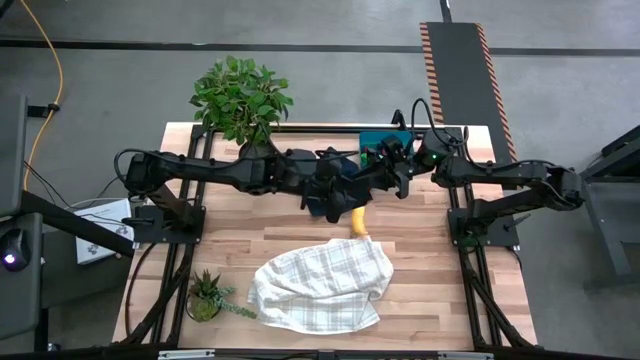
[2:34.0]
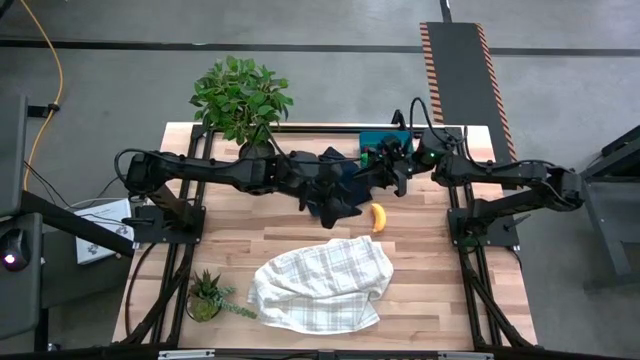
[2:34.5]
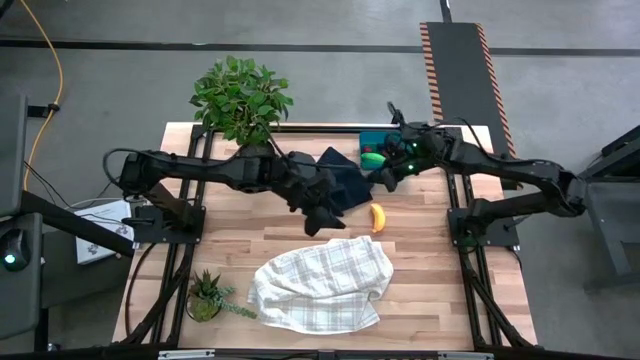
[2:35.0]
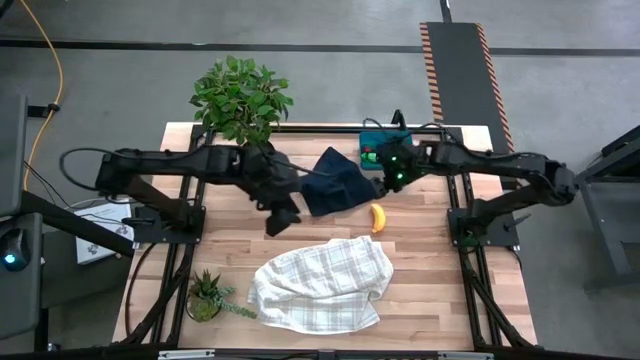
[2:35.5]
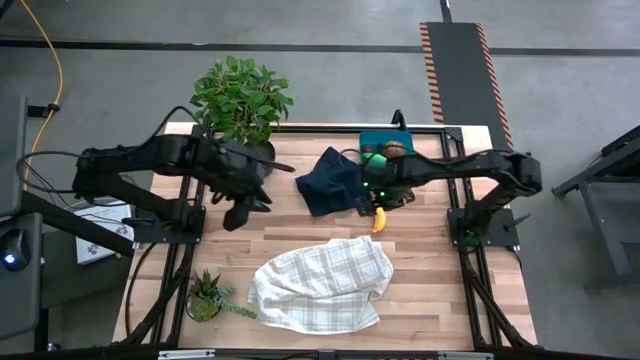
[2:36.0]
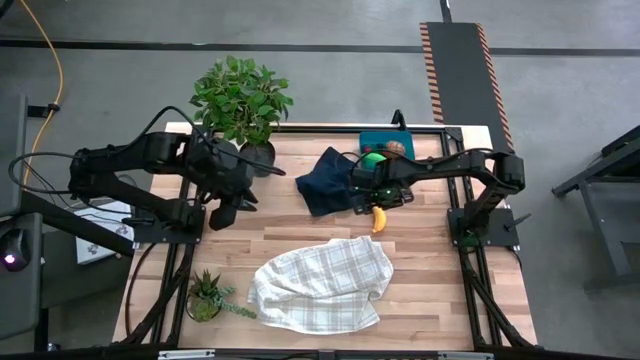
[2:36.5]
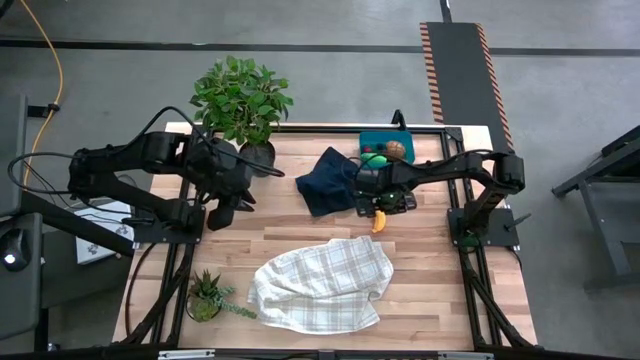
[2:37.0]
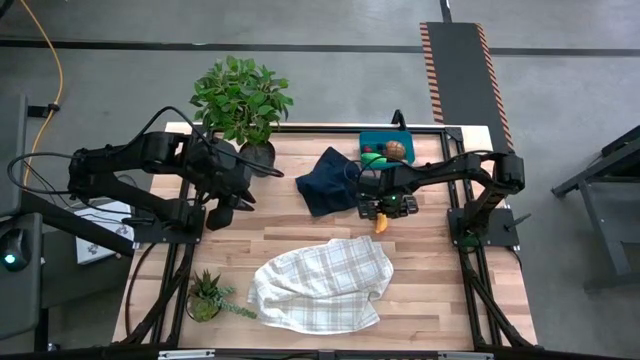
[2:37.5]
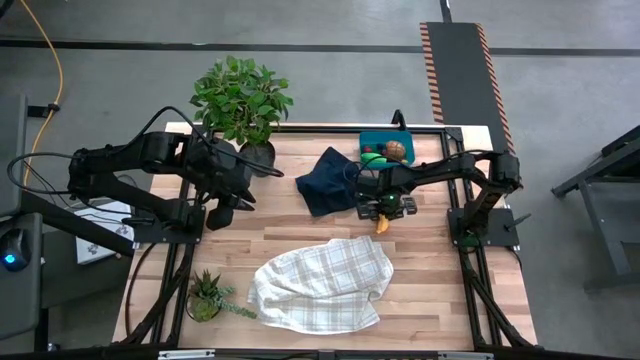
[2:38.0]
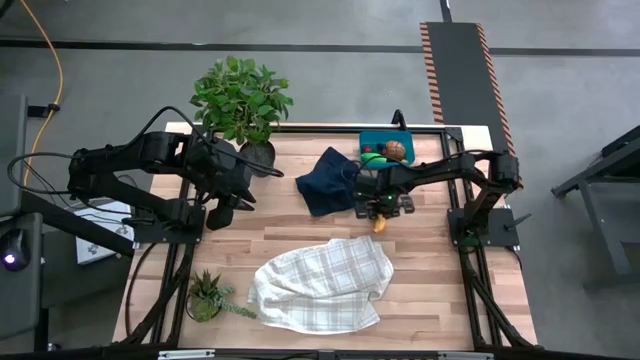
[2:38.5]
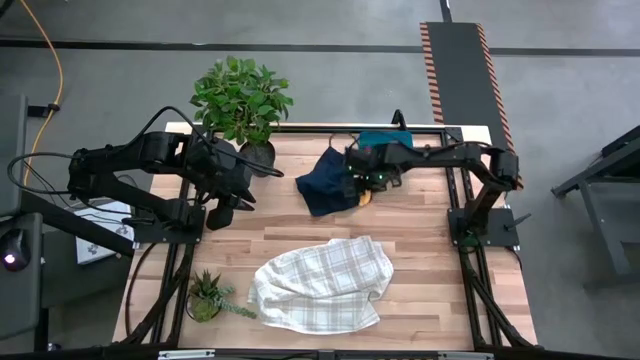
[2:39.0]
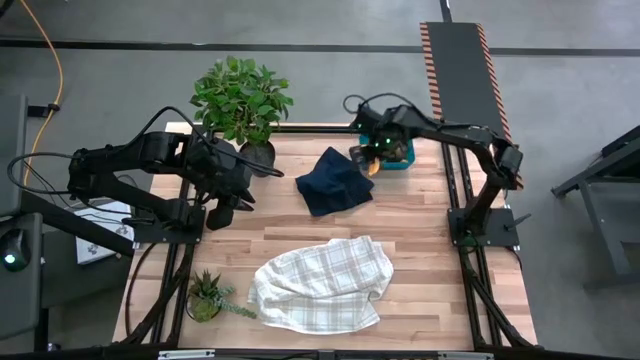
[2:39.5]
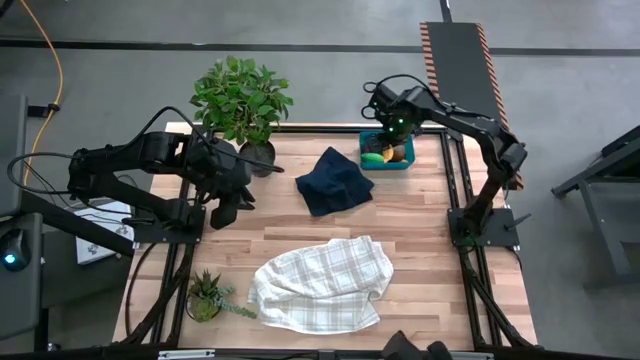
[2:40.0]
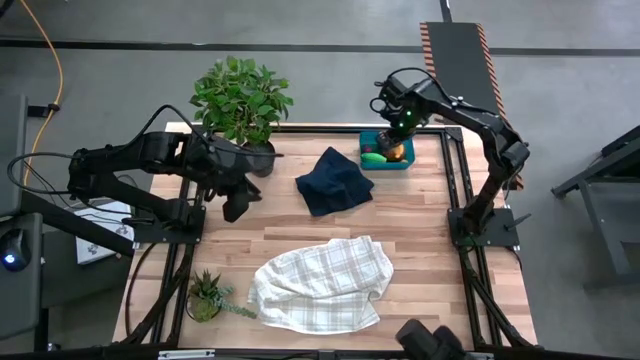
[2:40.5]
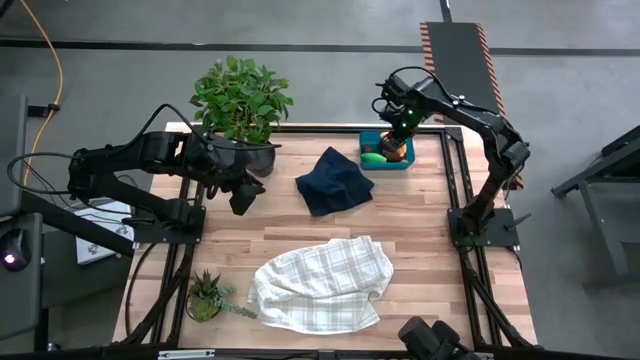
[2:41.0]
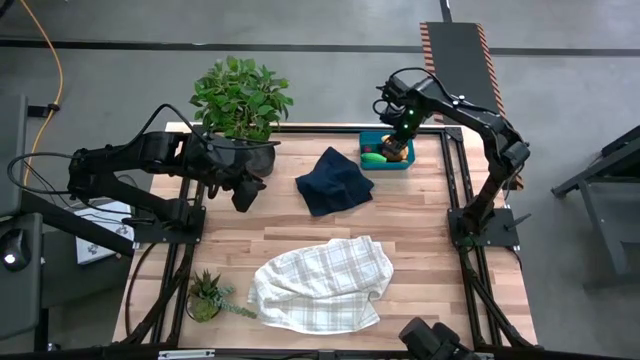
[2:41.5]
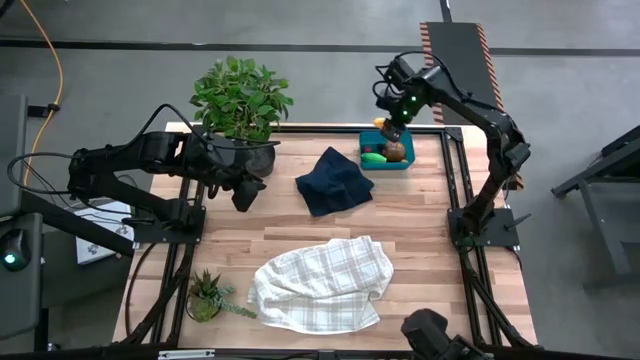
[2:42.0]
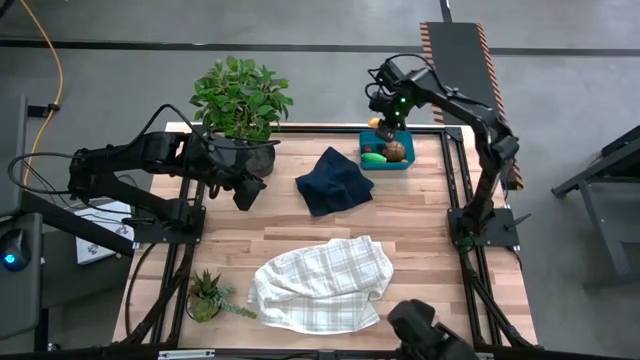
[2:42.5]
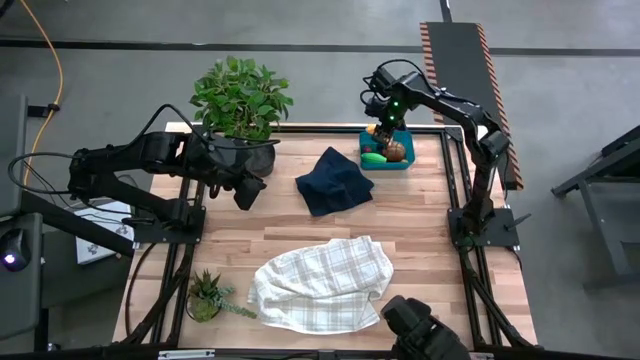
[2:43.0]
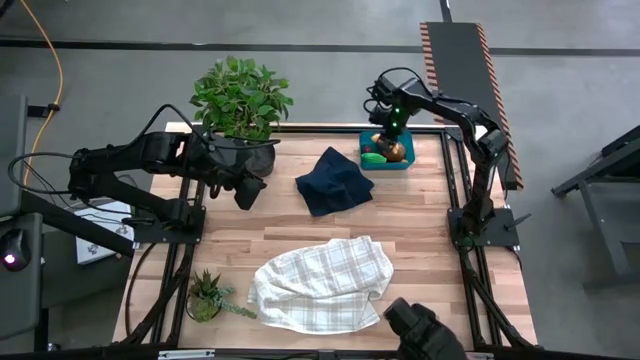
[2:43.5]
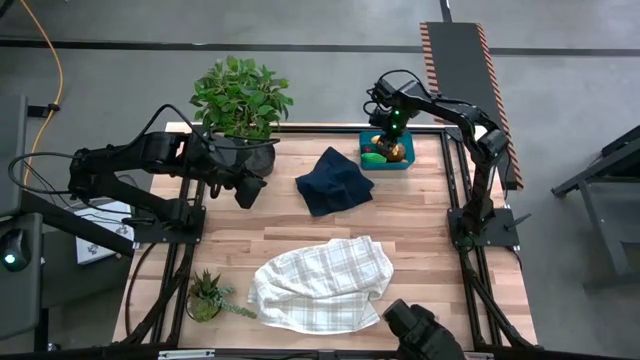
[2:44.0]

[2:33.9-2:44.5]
Task: Pick and placing Produce into tupperware
Put the yellow banana into the blue bin

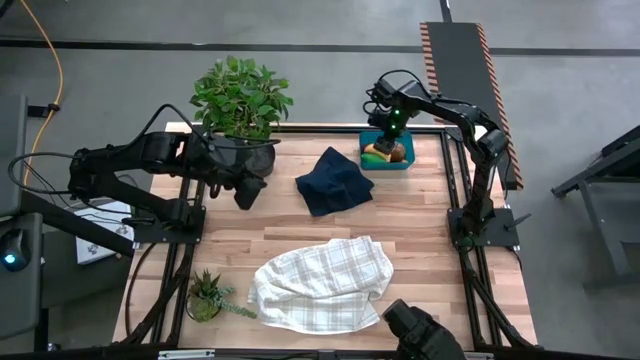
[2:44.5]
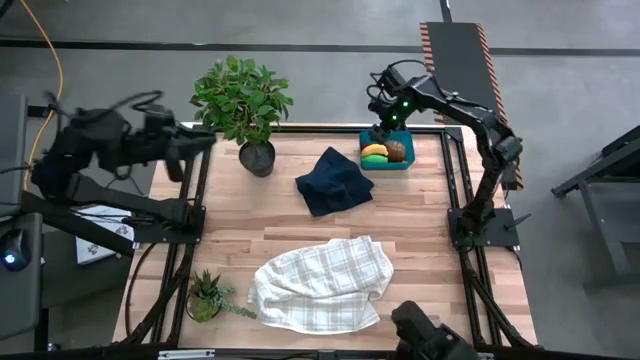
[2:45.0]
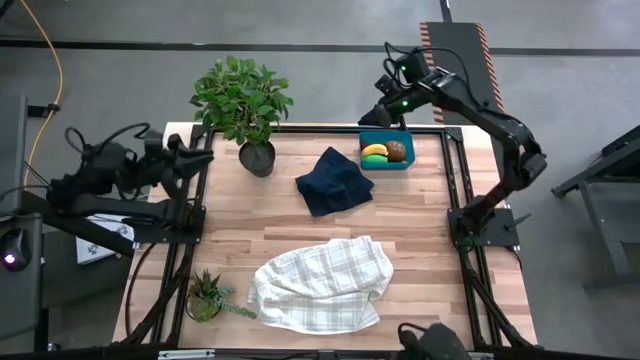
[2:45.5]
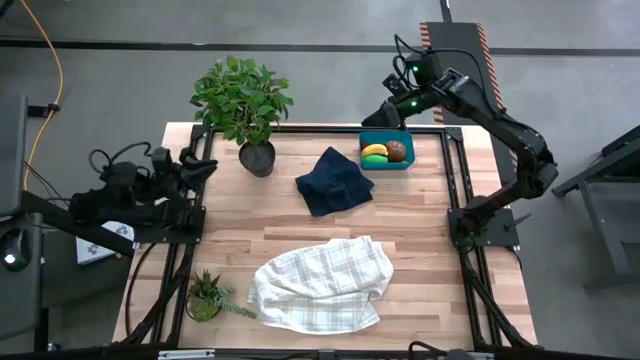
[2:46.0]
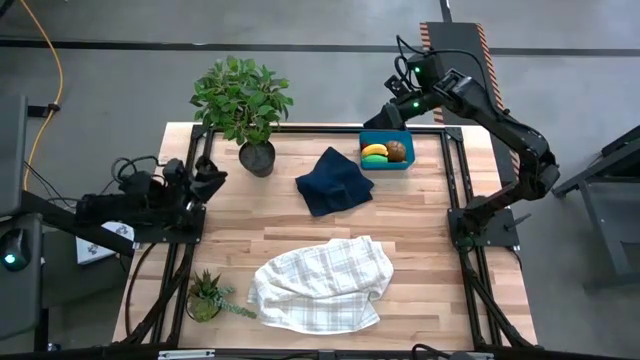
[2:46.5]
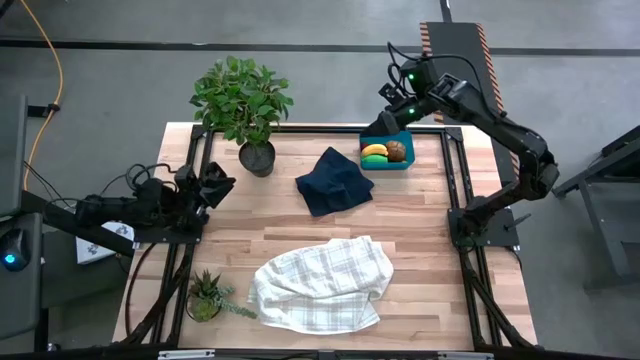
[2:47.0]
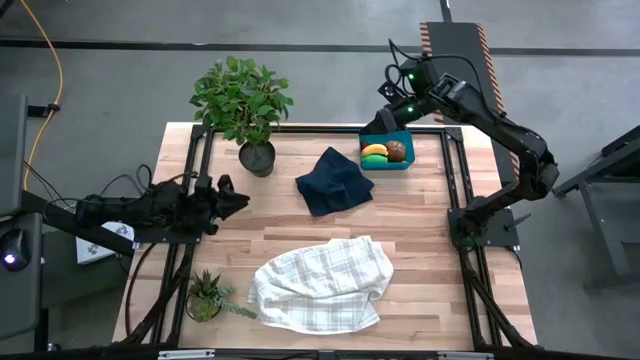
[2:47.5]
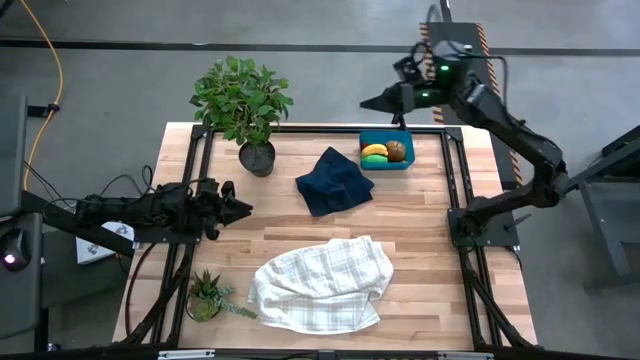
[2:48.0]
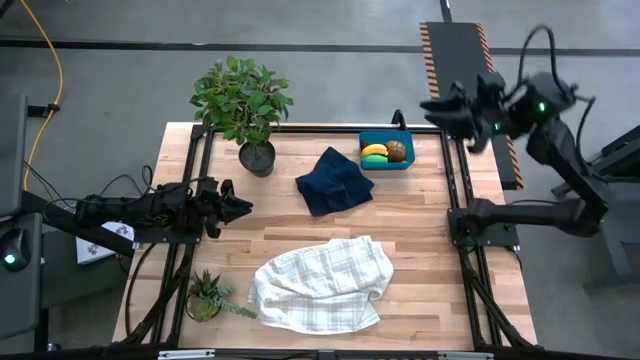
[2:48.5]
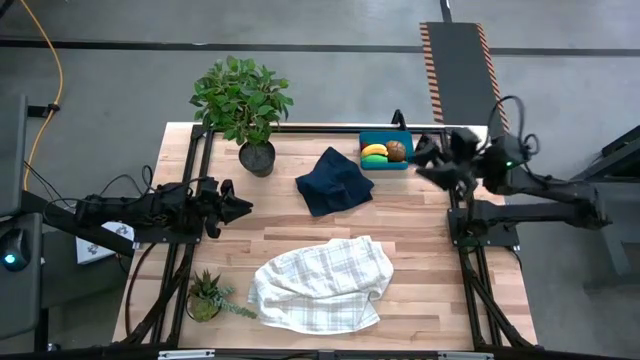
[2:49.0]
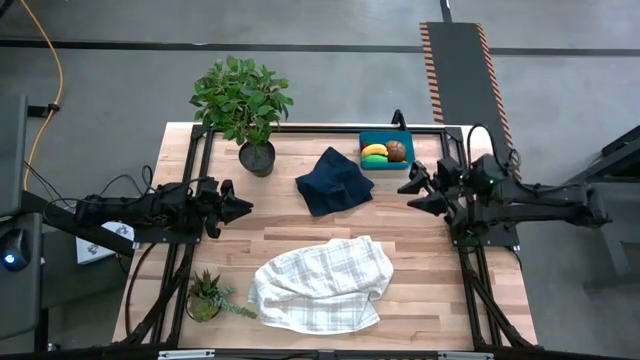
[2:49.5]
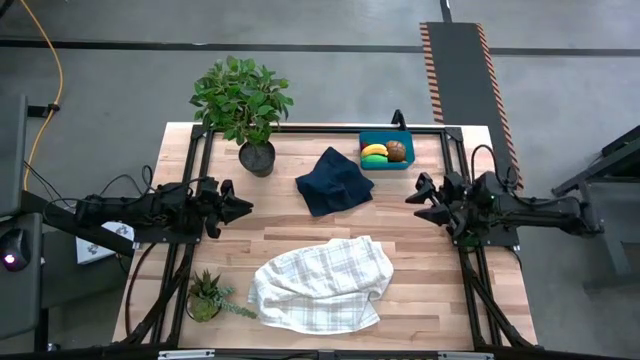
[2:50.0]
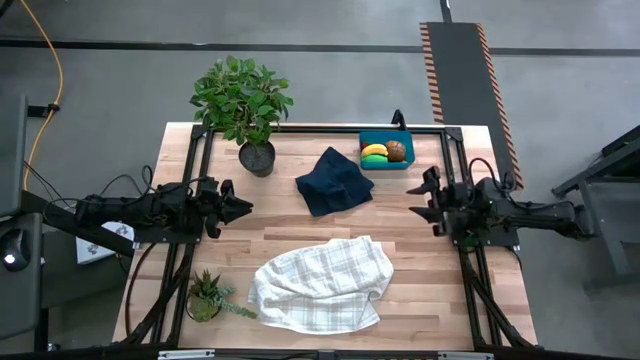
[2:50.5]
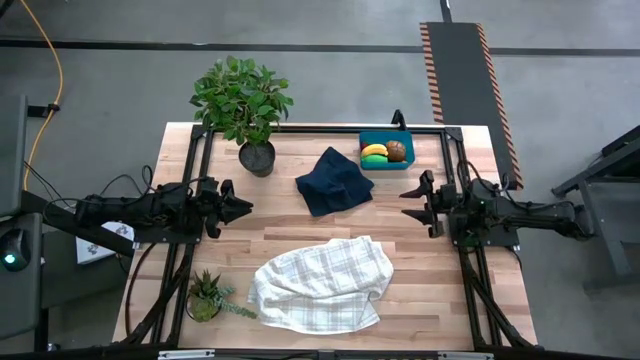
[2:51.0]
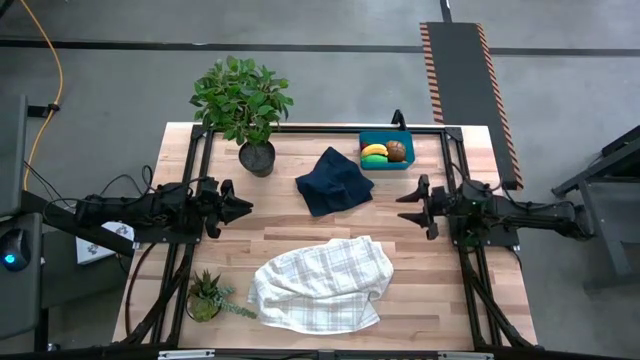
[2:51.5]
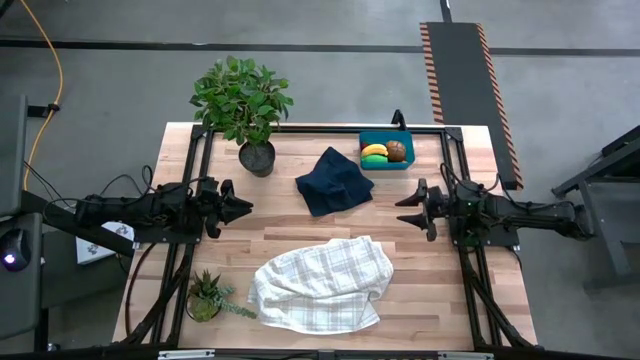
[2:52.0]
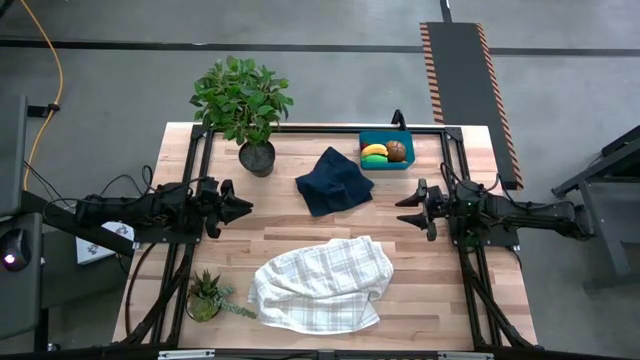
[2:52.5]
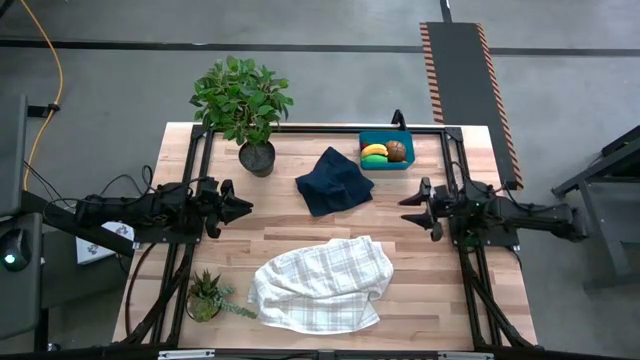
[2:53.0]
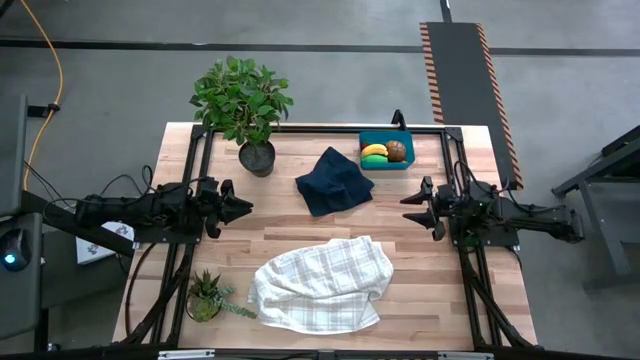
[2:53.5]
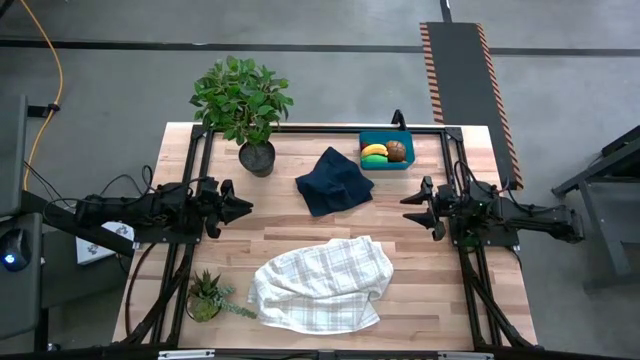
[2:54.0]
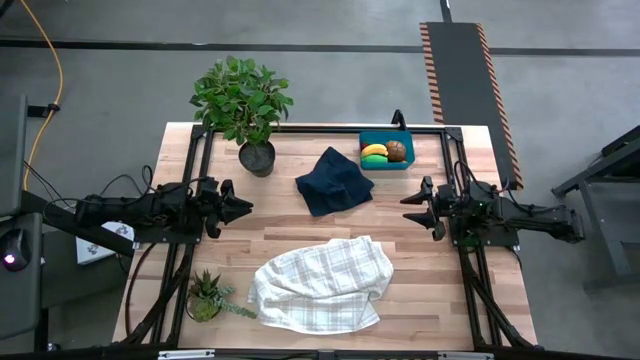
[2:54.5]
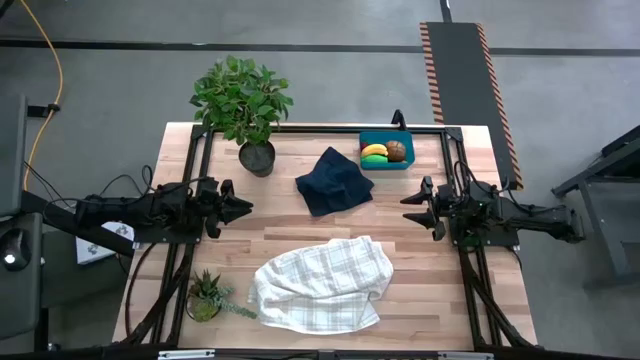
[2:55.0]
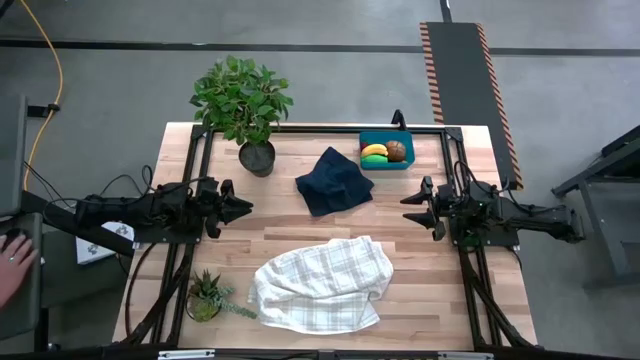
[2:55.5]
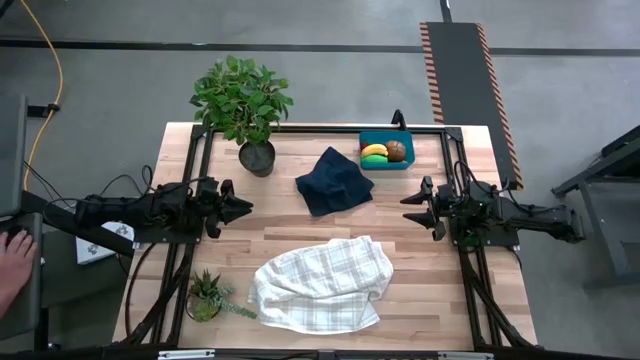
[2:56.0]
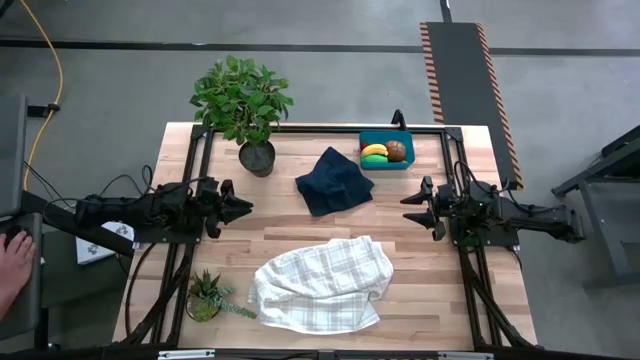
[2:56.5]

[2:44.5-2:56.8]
Return to Home Position
